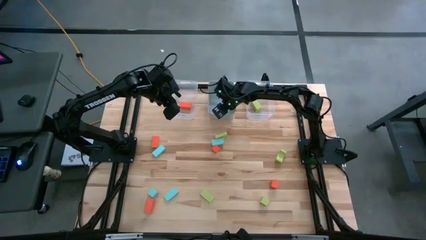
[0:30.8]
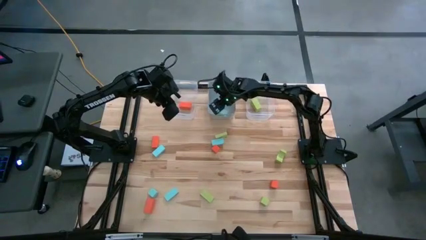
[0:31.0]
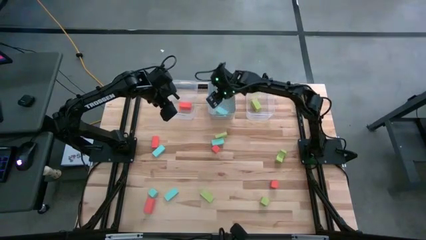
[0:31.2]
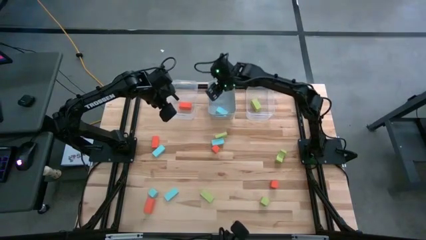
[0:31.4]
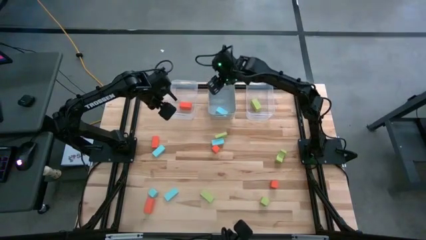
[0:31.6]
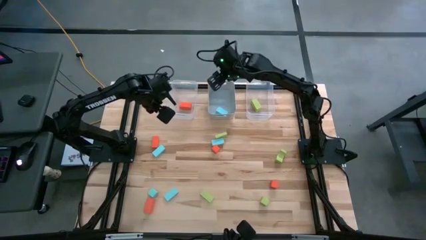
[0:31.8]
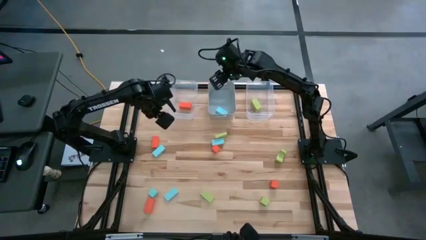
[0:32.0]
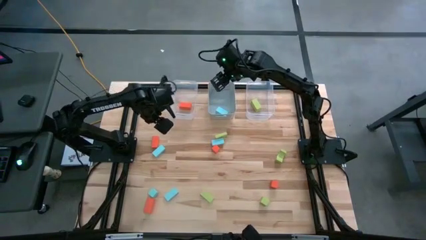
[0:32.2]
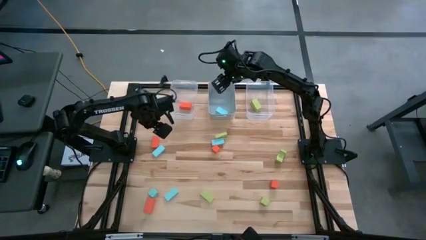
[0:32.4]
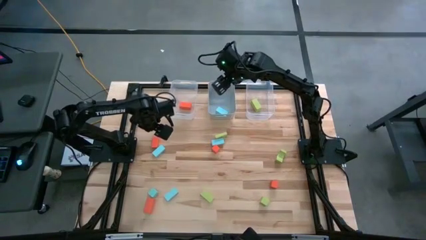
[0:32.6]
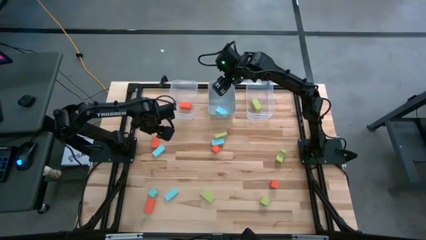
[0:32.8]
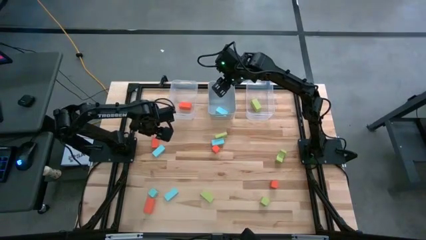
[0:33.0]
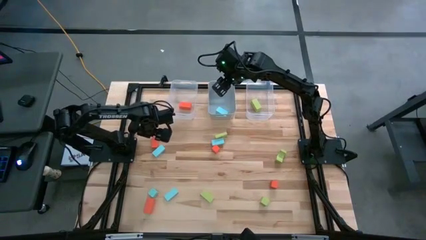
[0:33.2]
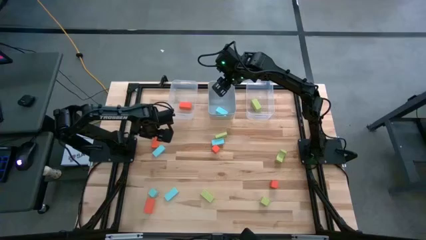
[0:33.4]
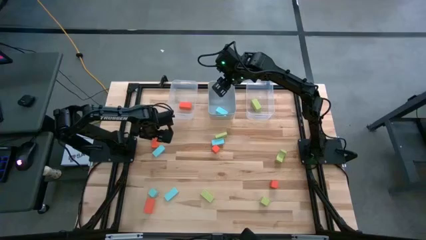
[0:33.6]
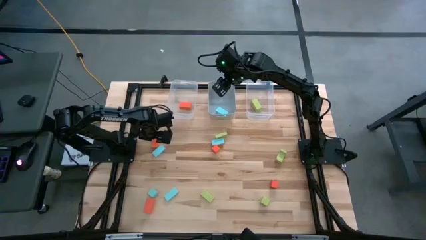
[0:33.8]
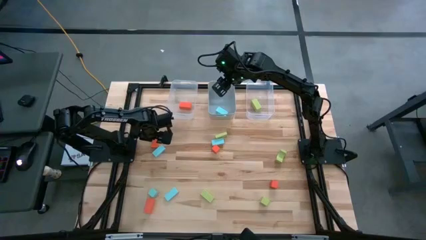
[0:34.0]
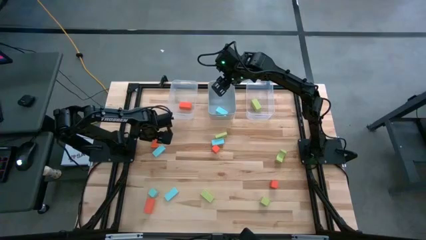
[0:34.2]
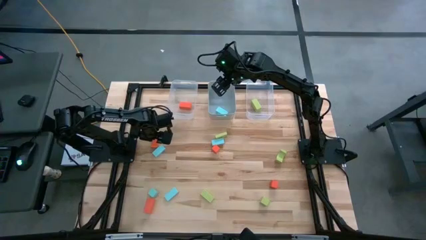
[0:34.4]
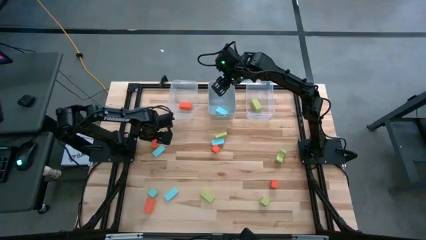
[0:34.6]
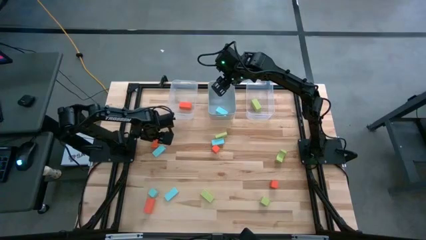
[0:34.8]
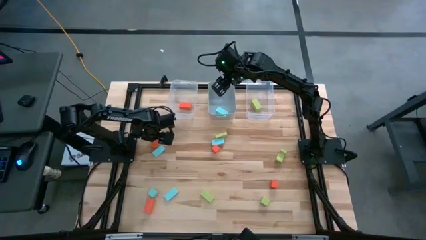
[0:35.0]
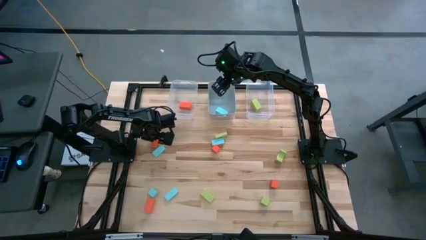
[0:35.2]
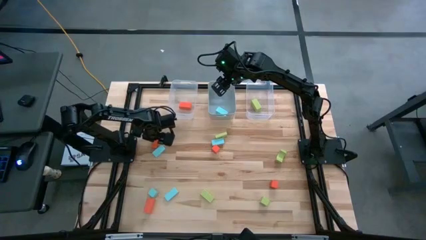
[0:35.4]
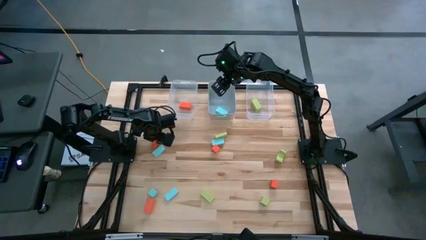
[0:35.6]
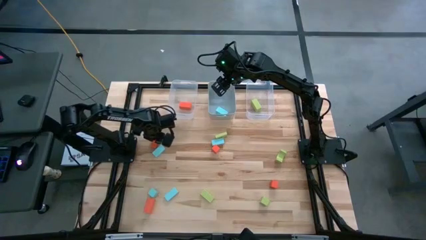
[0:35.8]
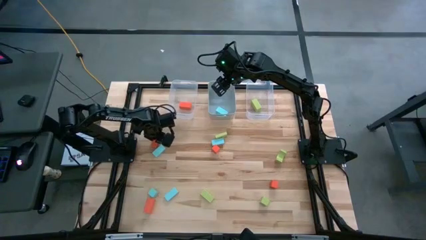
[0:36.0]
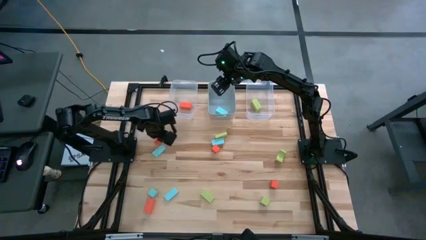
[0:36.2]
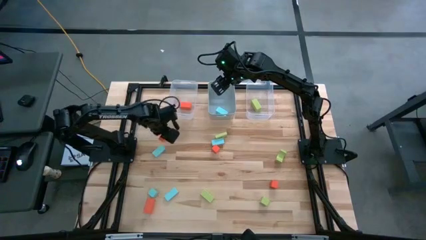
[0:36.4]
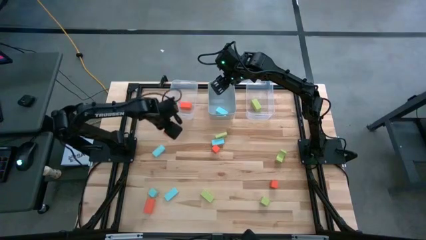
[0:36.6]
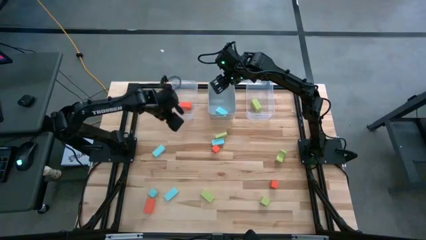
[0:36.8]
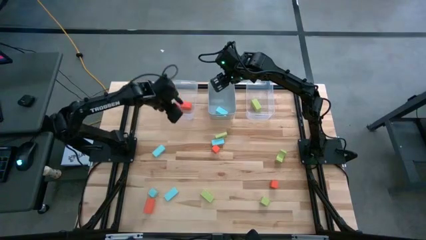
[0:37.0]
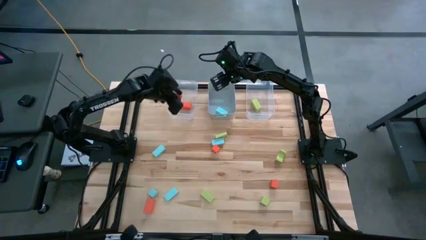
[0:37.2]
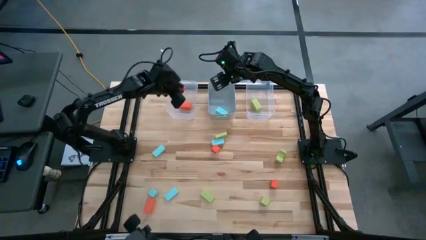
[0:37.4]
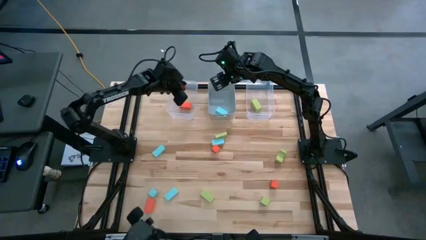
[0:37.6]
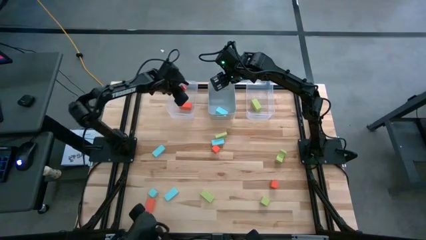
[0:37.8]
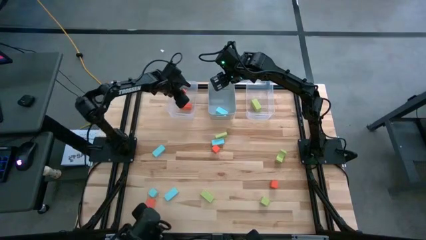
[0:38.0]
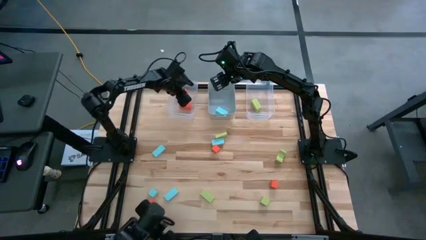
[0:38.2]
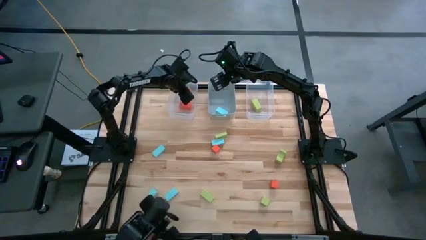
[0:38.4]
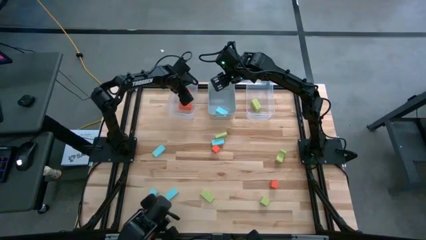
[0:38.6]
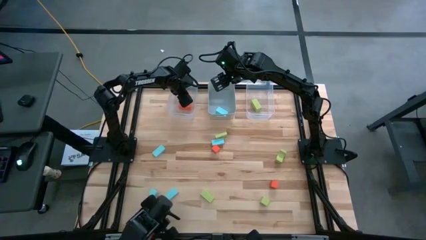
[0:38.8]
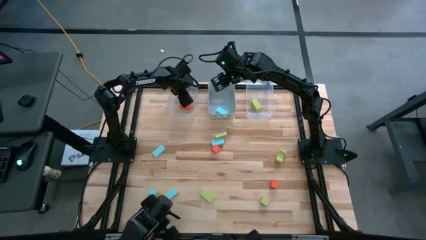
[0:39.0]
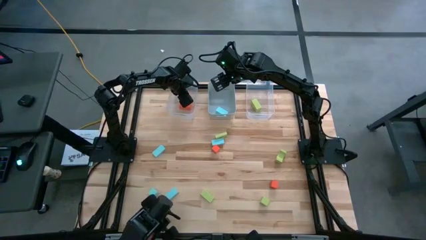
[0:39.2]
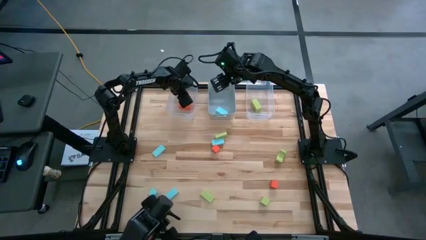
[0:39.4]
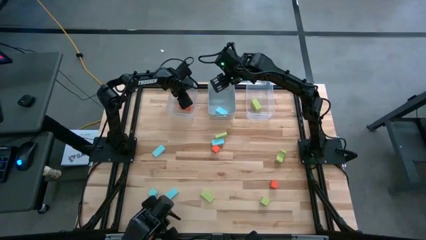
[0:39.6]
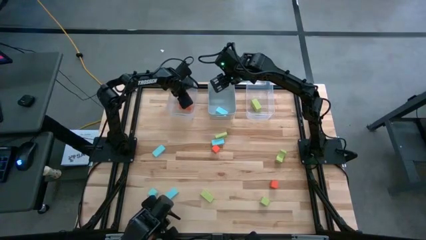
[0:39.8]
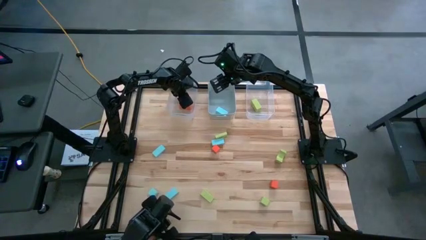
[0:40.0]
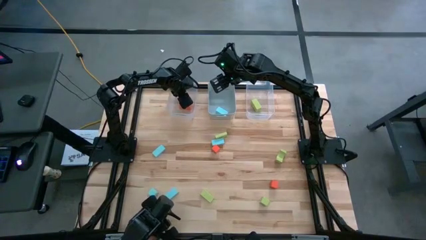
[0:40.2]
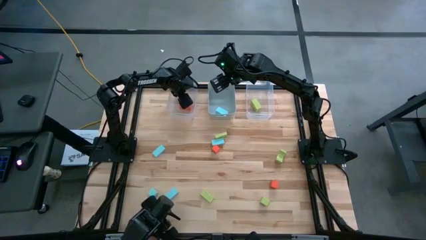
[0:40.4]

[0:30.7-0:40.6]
Task: Sort & place blocks by color
Put the orange block into the left transparent bin

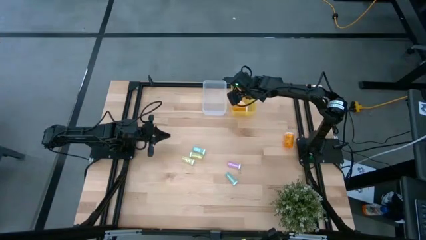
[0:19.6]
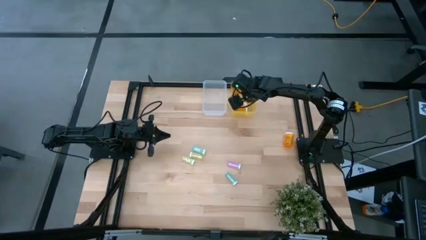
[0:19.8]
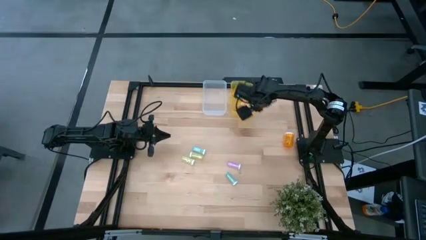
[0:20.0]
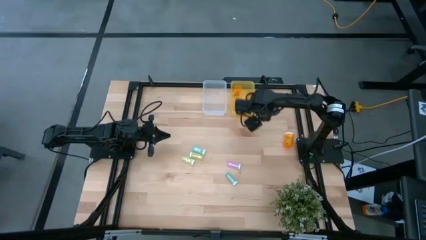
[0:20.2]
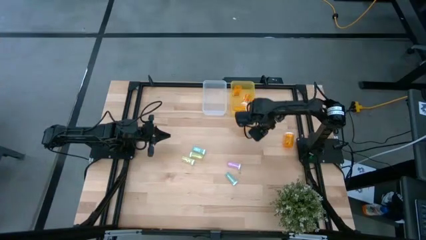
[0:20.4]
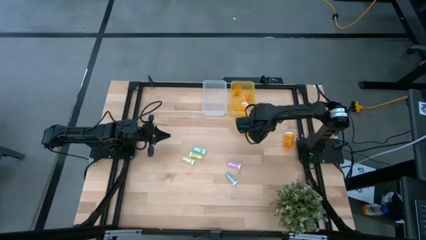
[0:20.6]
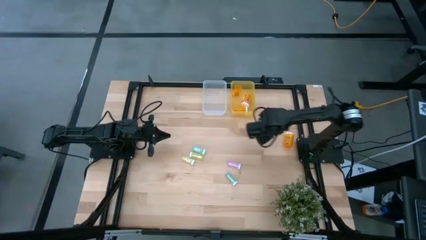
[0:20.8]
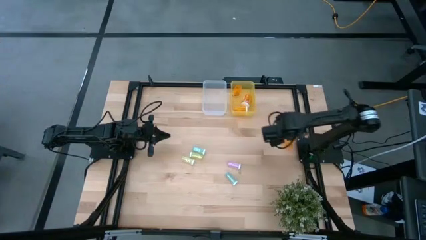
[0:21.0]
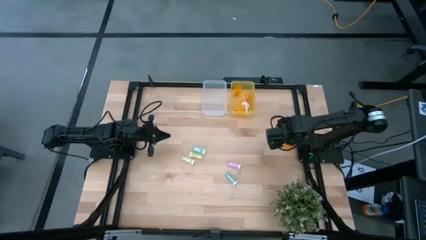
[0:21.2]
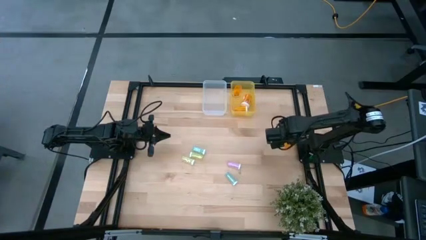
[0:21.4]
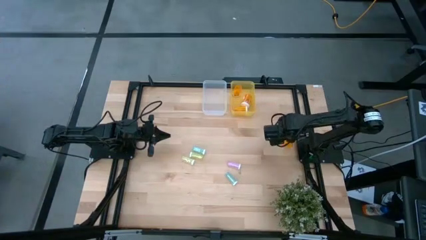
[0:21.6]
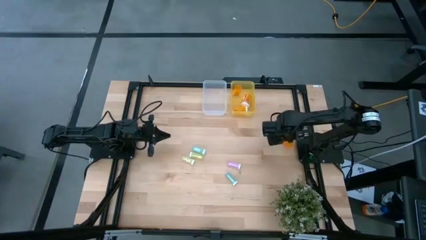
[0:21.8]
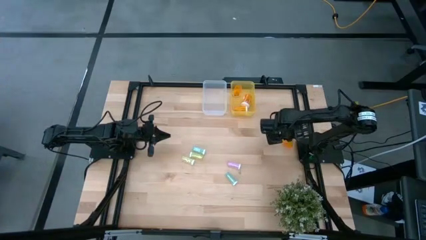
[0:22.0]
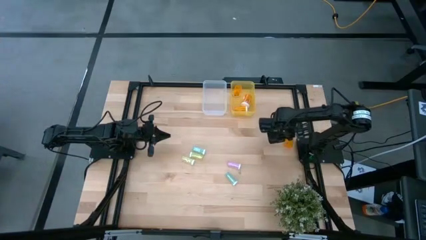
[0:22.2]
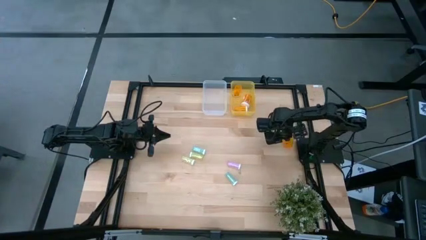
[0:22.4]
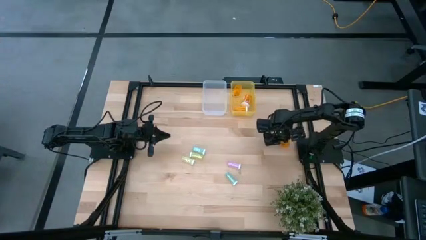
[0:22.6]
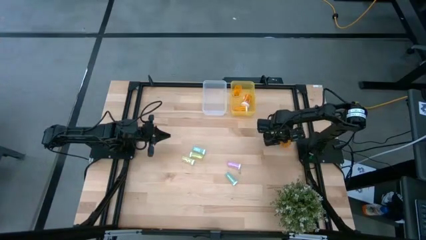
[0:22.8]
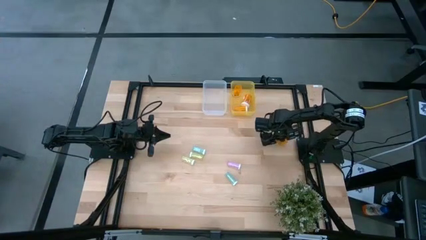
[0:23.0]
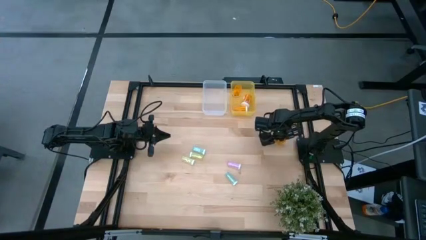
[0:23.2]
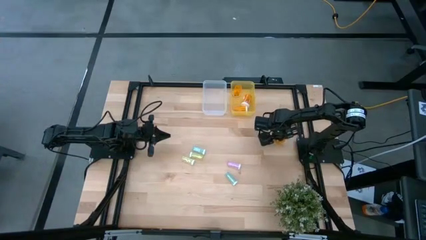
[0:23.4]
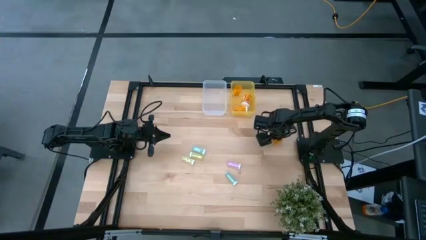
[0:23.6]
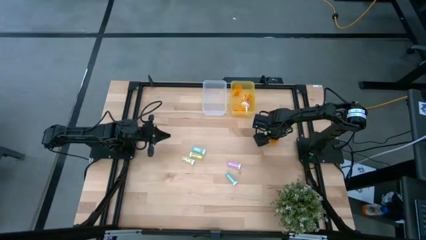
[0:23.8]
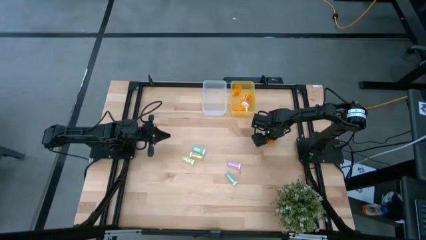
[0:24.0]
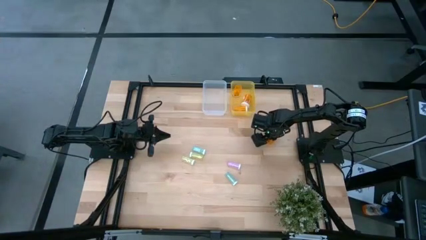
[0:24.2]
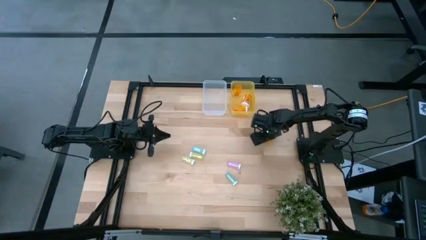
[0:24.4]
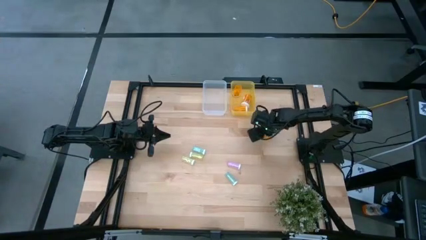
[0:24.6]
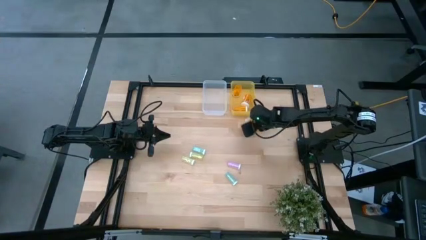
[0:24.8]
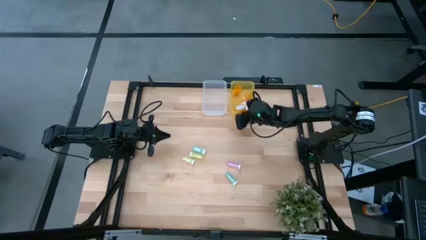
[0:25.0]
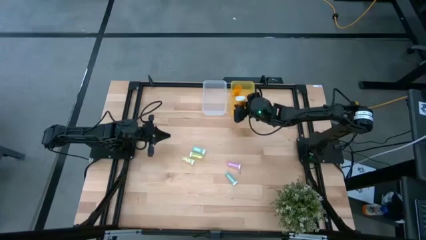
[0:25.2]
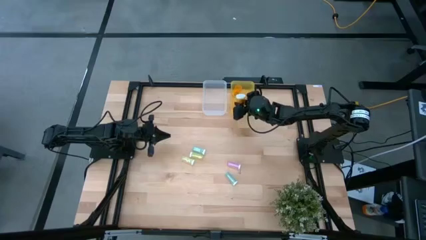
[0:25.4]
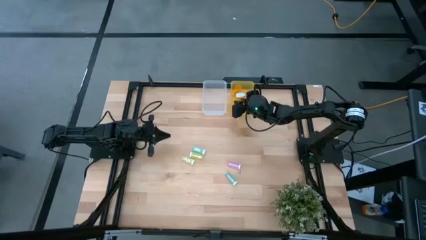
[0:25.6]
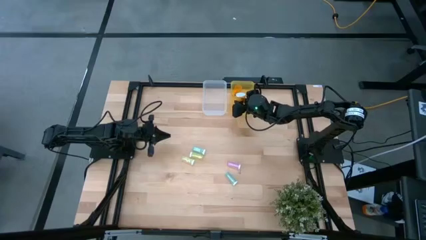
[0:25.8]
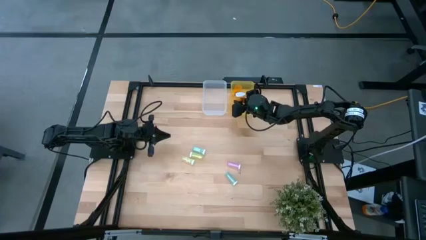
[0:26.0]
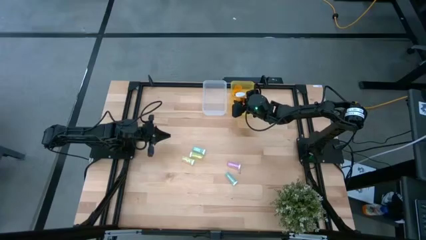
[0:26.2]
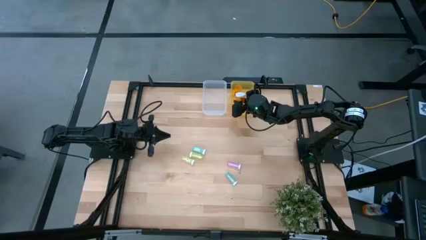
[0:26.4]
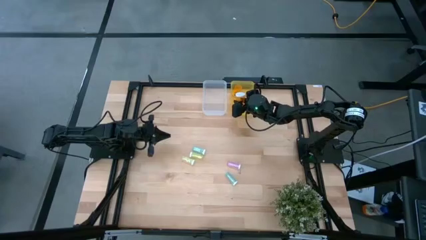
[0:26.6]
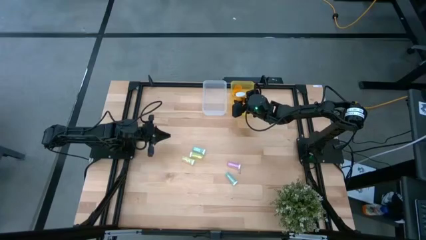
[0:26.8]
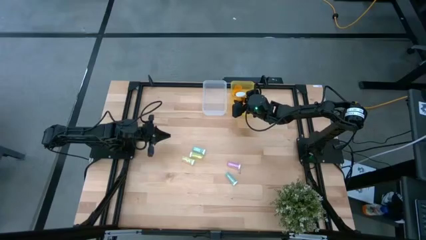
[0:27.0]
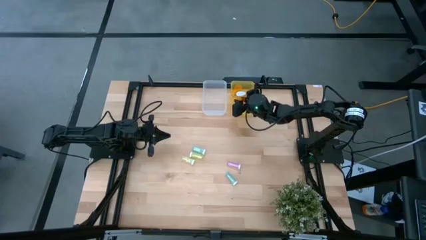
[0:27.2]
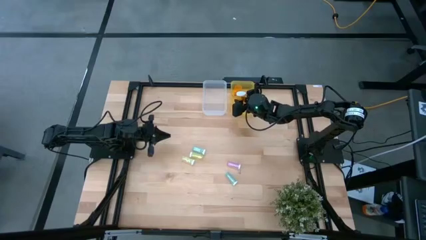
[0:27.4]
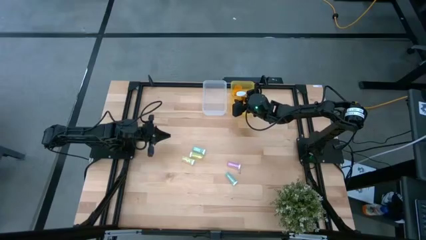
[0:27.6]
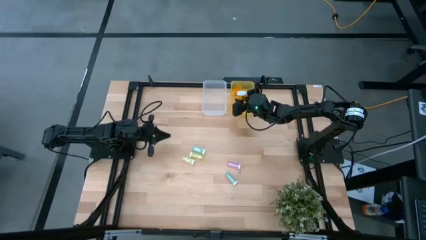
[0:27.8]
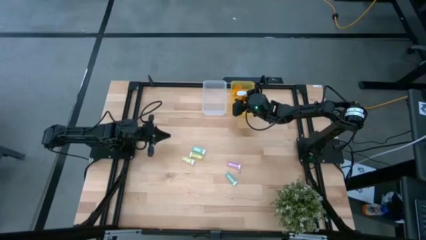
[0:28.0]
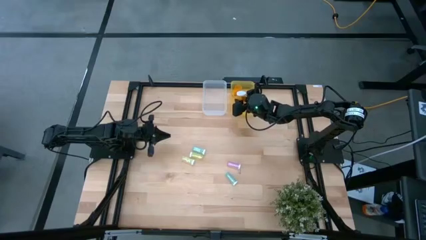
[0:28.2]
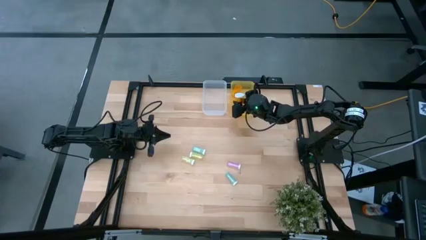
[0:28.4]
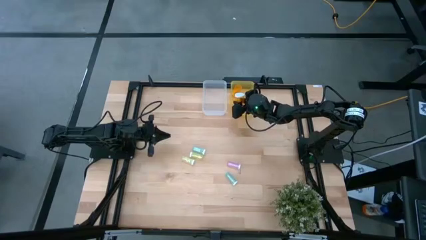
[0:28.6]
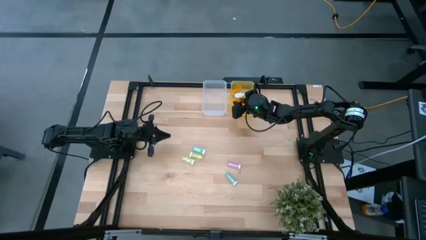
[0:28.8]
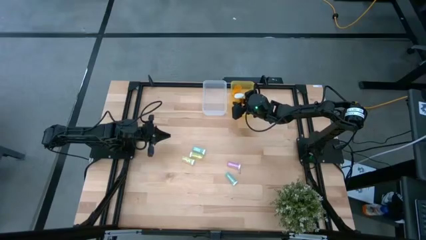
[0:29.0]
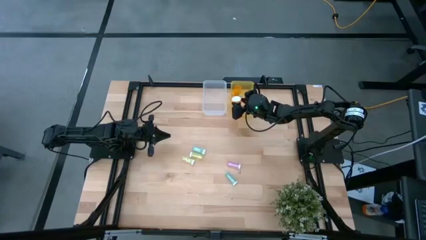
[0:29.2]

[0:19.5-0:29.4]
Task: Pick and place medicine bottles into bin by pill shape (circle, oval)
Put the large orange pill bottle into the yellow bin
